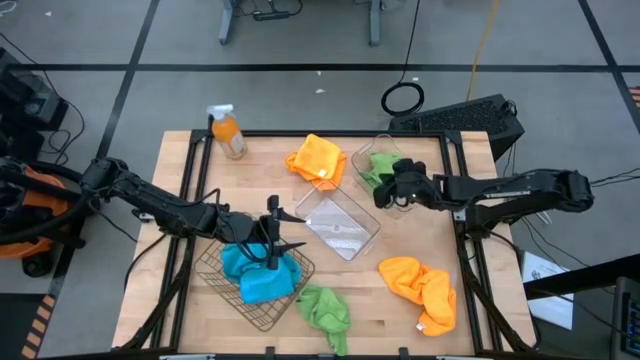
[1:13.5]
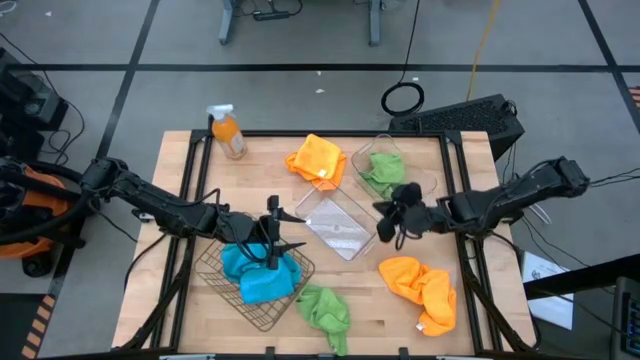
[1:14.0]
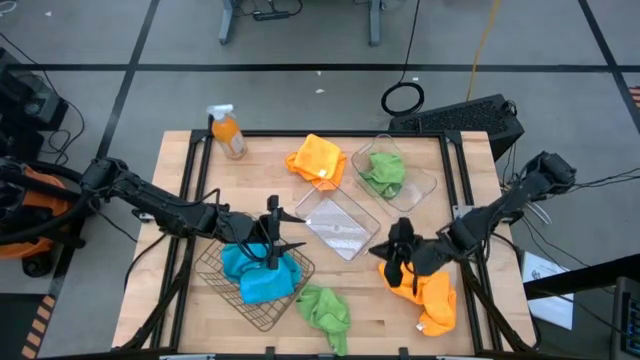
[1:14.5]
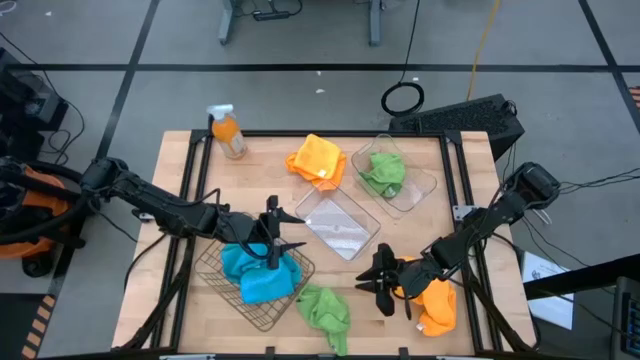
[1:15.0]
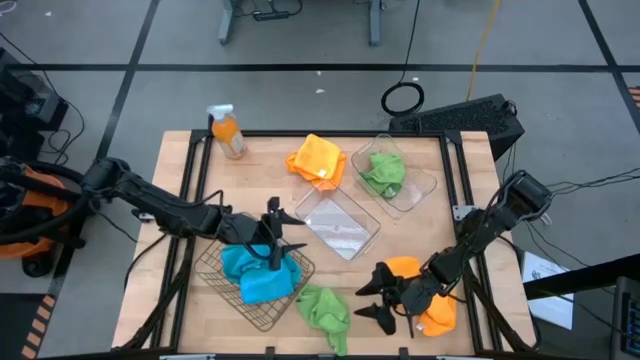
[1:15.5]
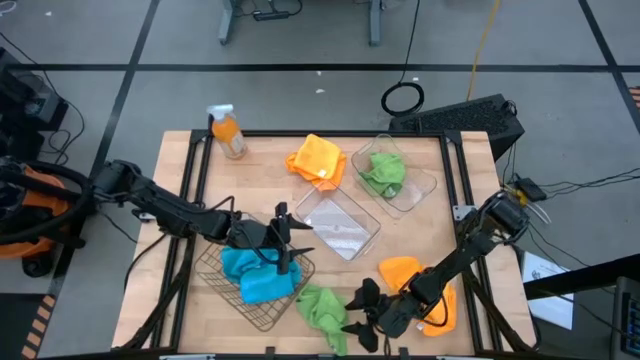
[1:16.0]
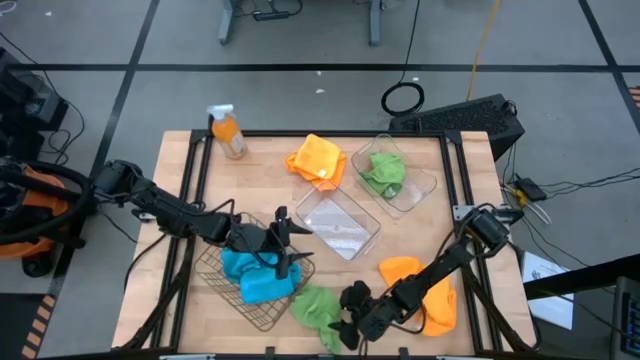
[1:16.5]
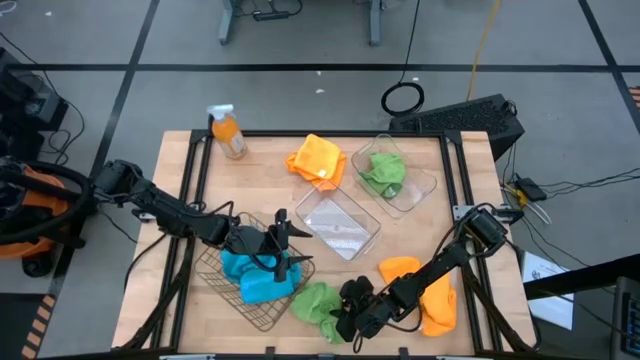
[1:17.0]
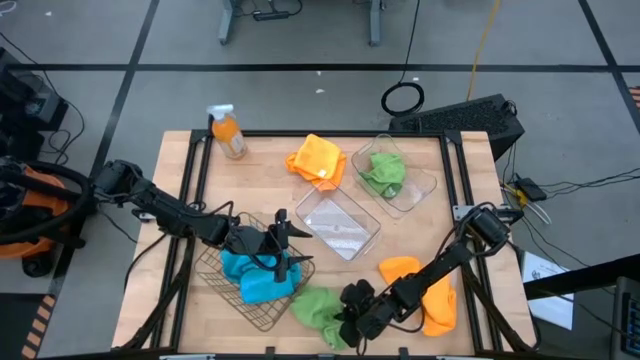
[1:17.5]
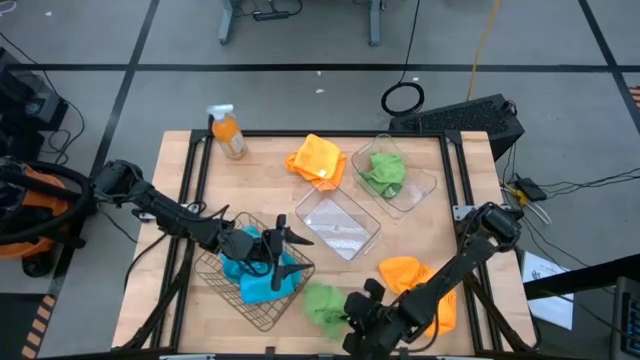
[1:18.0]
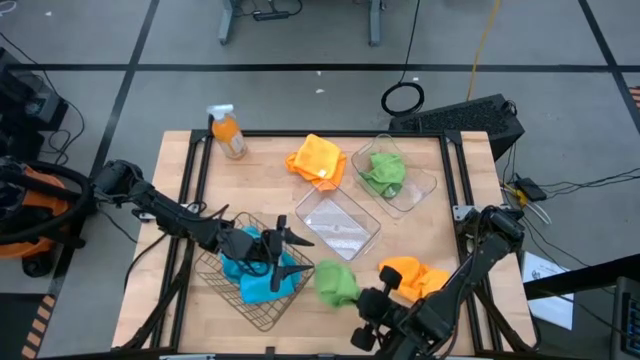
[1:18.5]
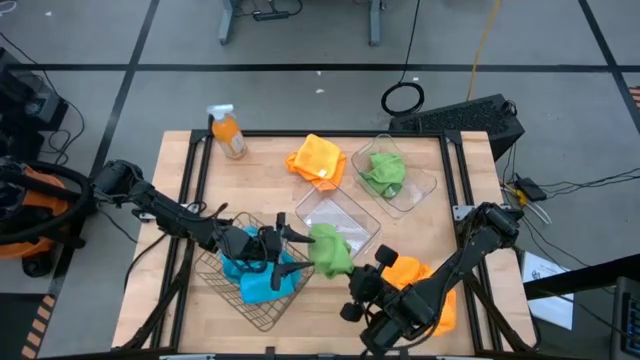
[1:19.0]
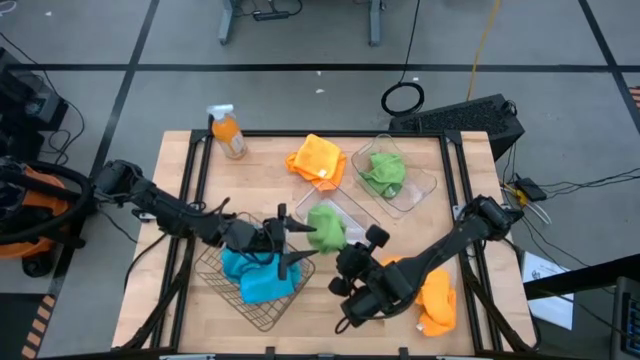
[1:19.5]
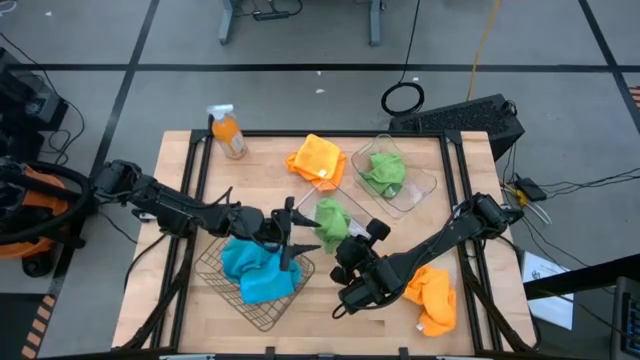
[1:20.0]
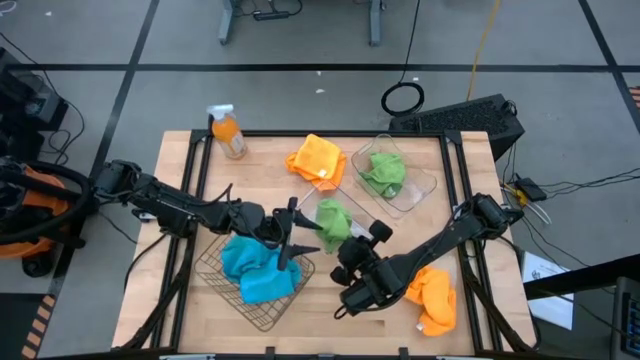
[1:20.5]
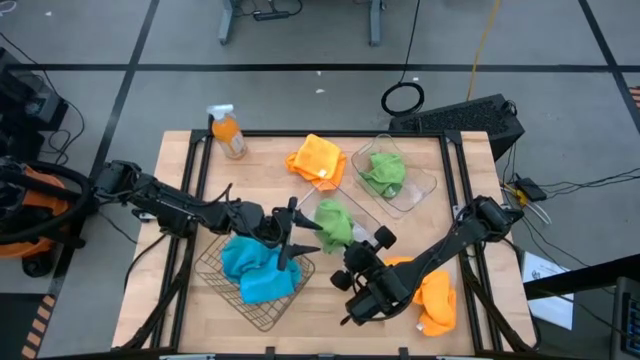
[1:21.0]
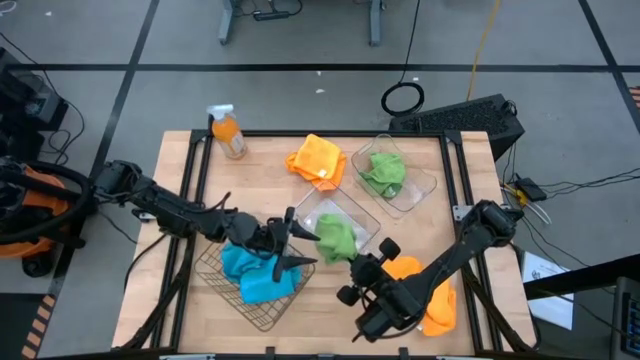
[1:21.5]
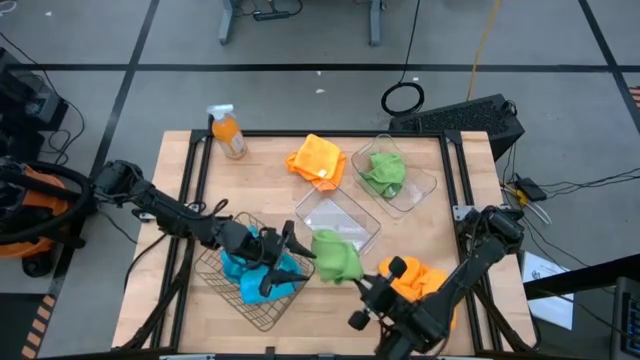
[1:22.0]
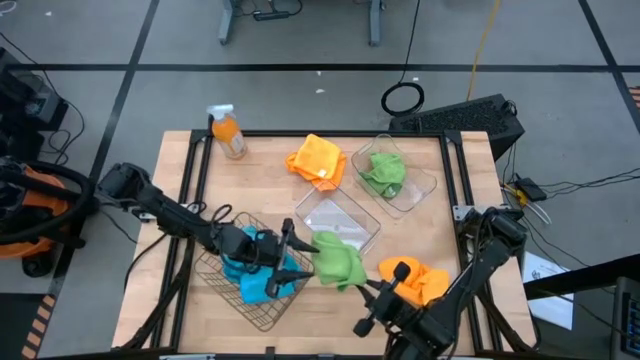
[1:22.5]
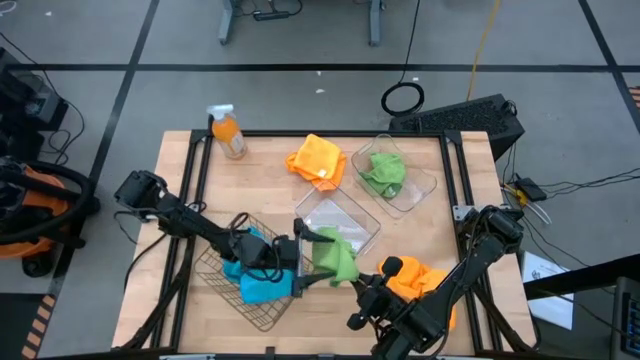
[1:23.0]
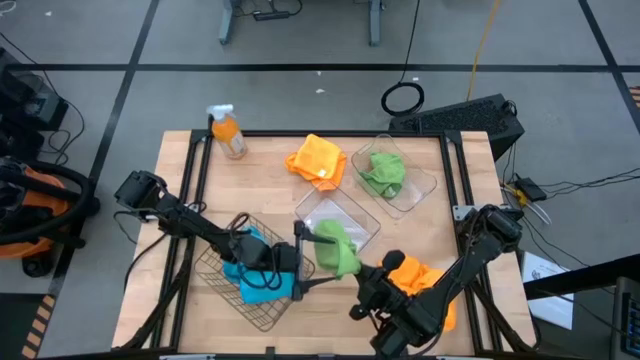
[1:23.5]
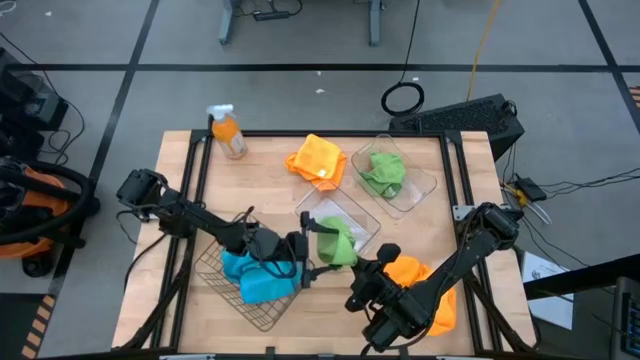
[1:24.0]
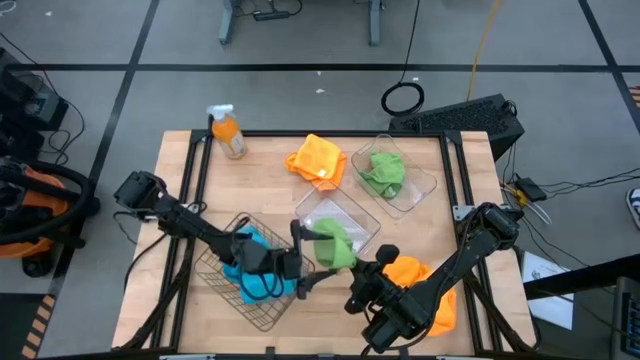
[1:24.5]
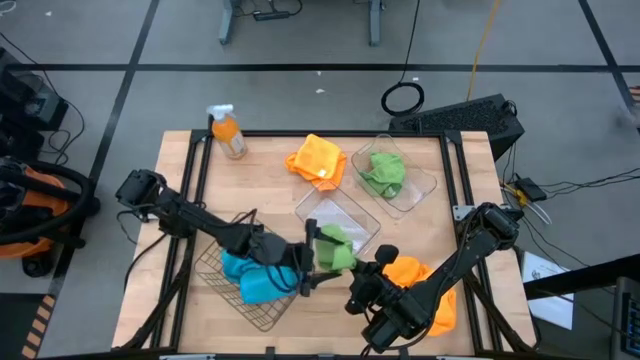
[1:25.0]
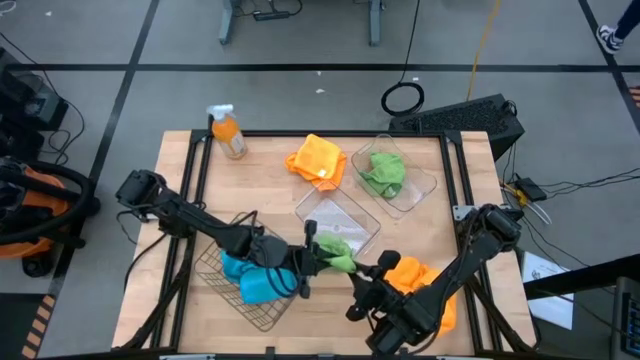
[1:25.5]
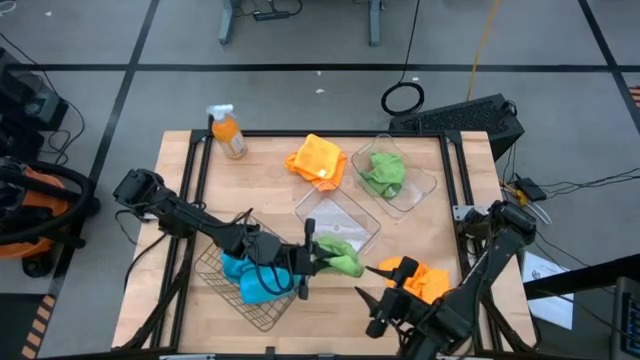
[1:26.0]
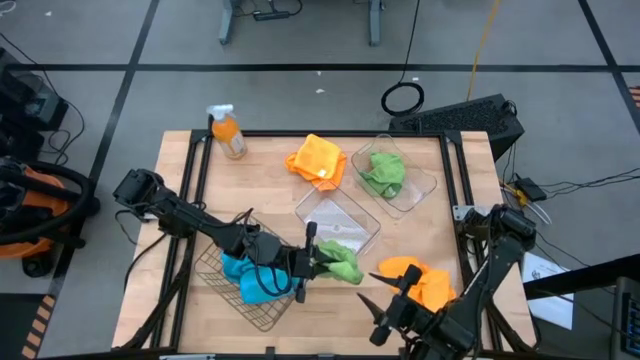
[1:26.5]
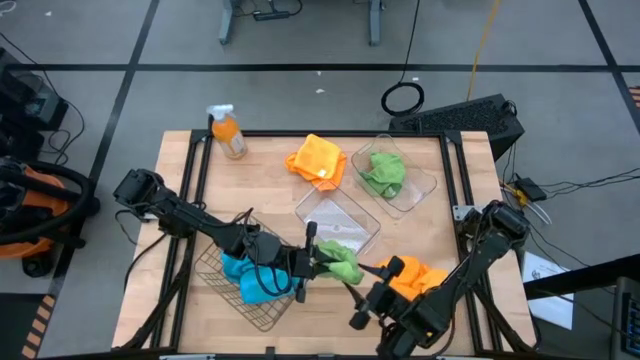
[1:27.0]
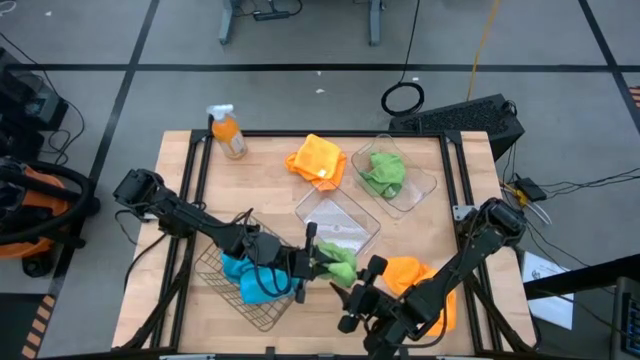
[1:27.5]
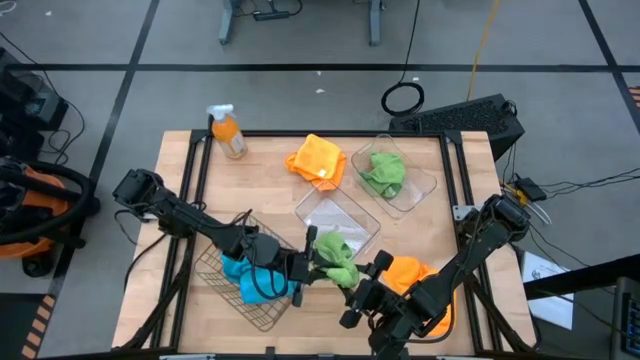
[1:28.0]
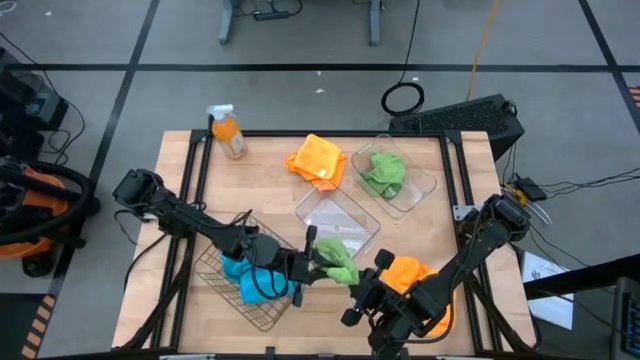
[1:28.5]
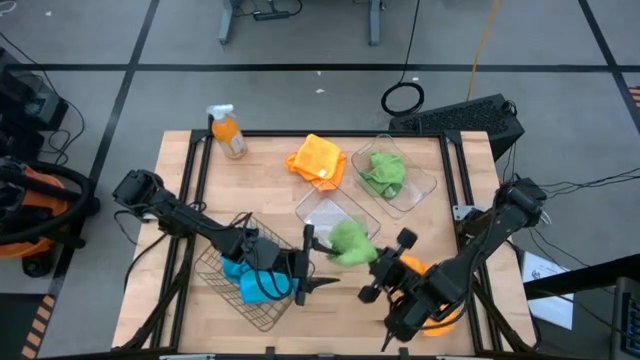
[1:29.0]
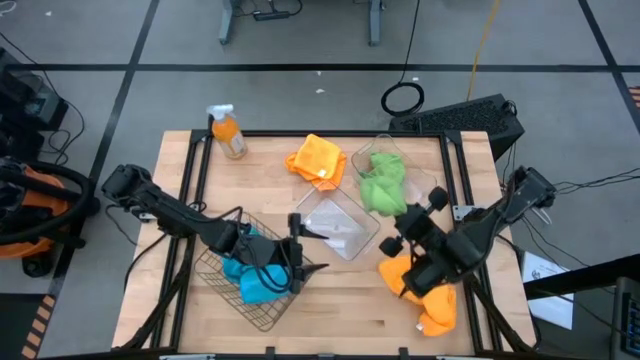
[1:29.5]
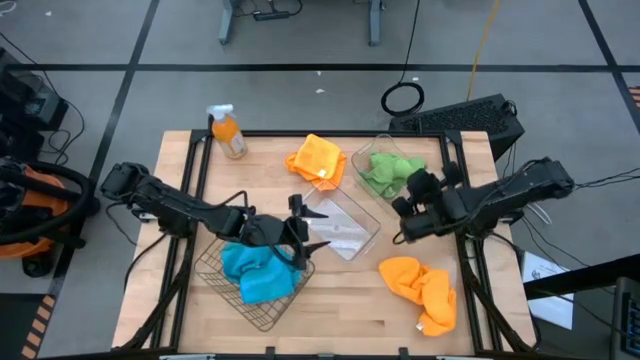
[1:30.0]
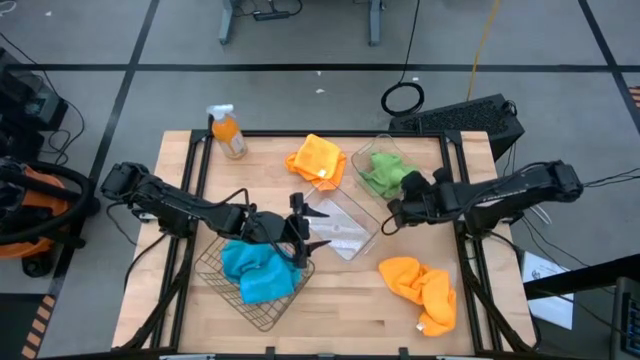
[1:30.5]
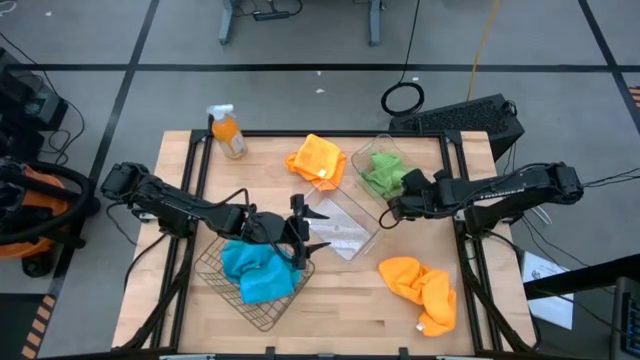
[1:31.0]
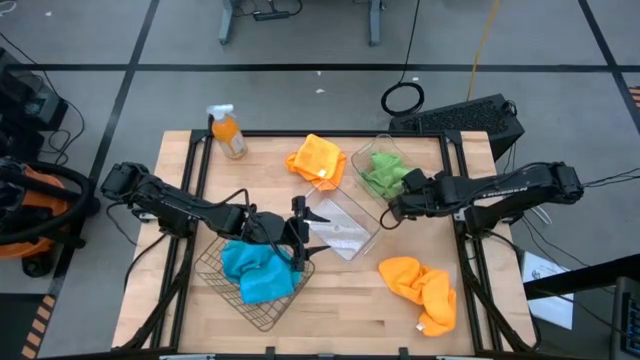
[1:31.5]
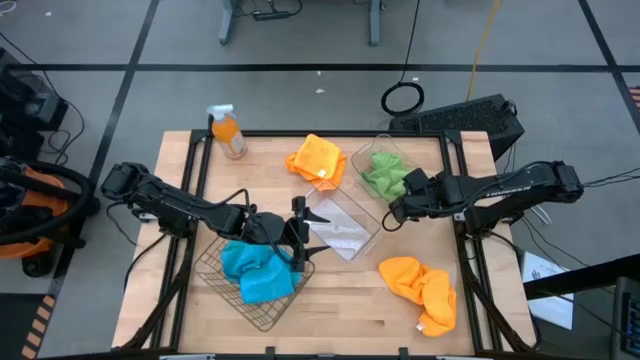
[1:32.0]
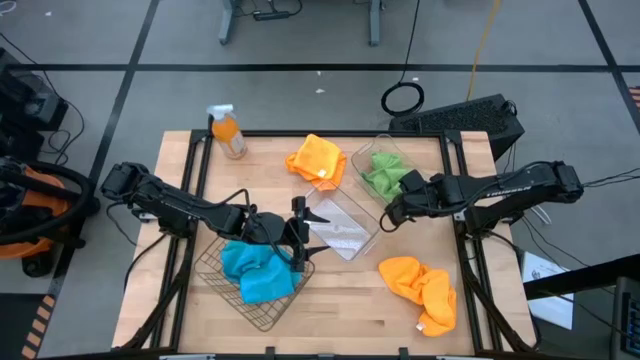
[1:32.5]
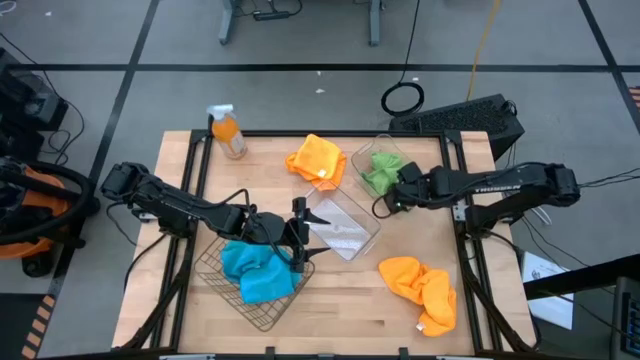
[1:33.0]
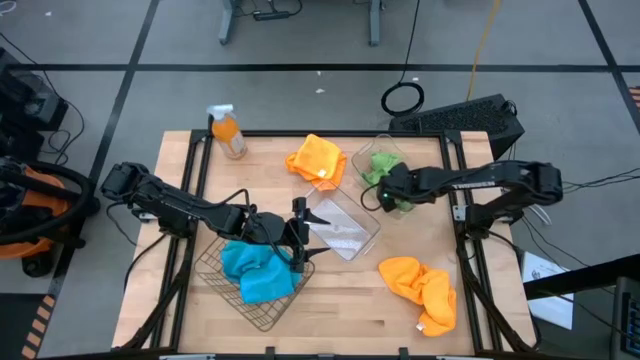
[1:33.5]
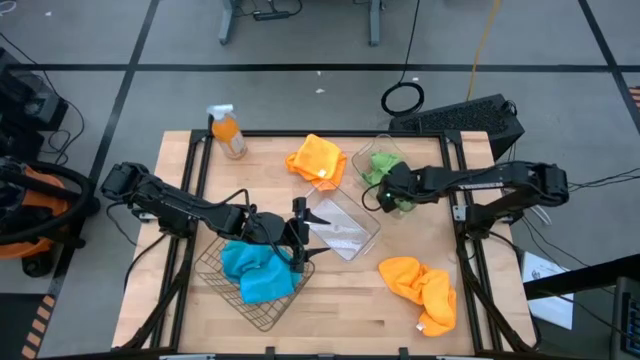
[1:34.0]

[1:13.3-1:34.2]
Task: Sort microfiber towel by color & place in baskets
Put the green microfiber towel into the top transparent bin
